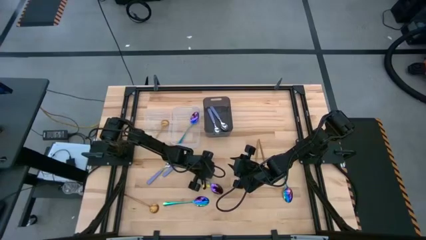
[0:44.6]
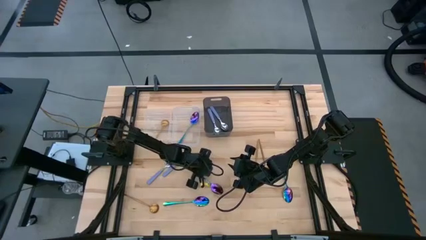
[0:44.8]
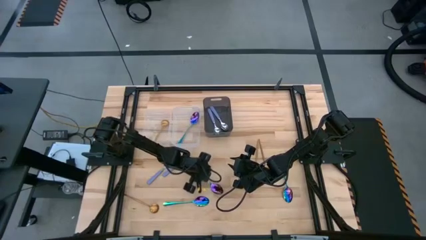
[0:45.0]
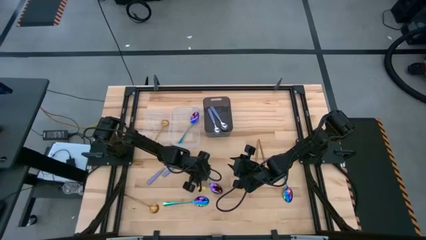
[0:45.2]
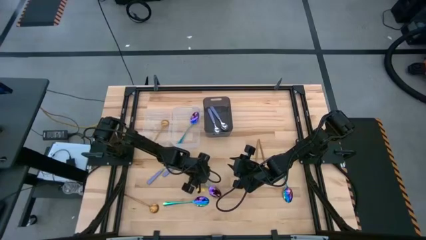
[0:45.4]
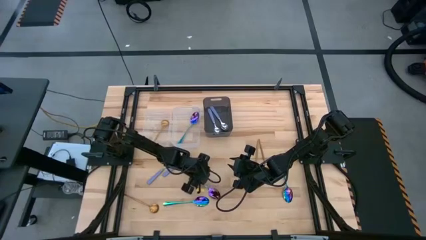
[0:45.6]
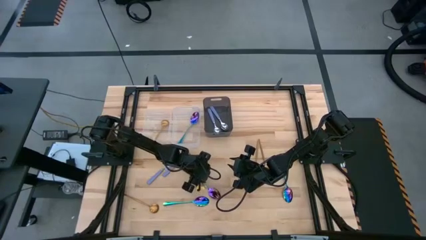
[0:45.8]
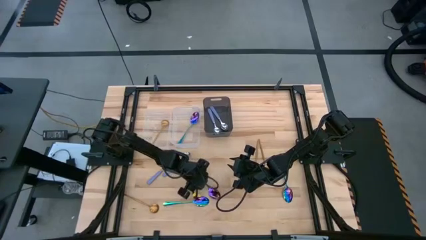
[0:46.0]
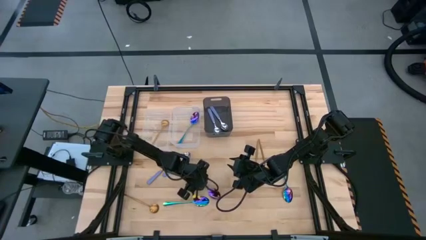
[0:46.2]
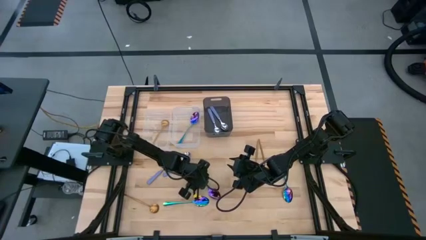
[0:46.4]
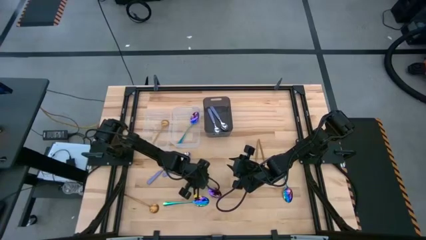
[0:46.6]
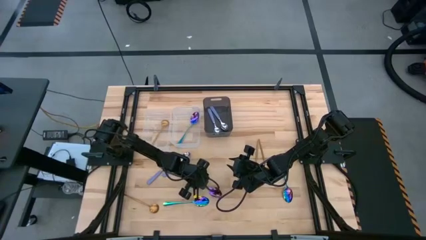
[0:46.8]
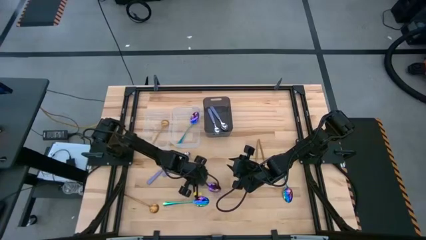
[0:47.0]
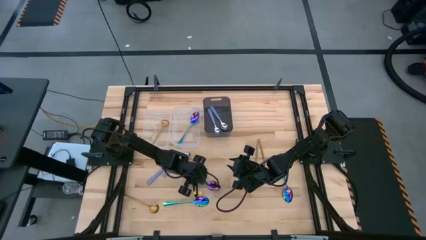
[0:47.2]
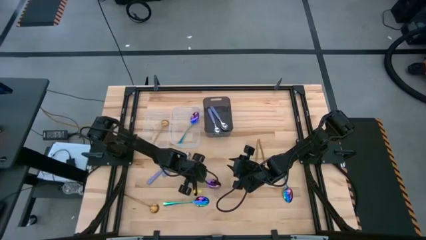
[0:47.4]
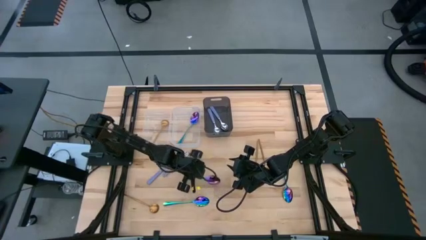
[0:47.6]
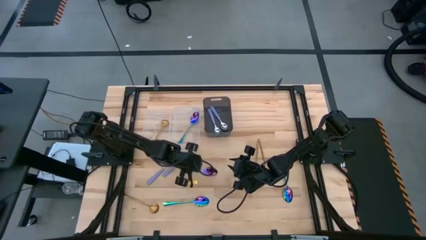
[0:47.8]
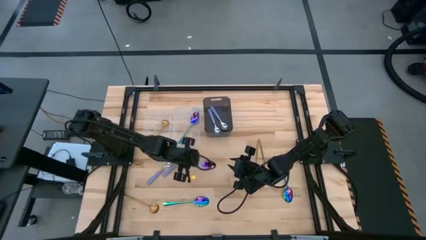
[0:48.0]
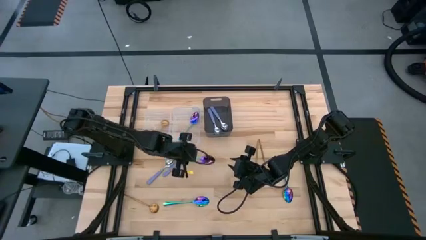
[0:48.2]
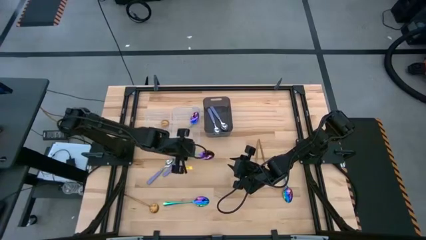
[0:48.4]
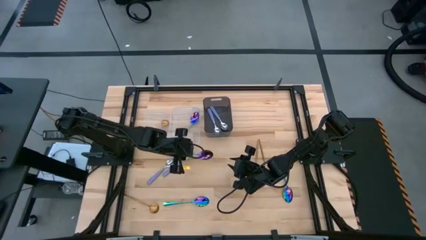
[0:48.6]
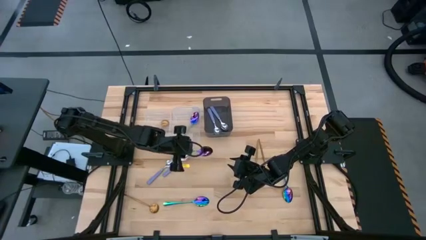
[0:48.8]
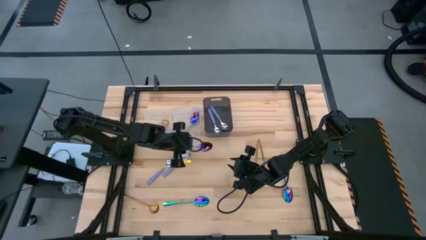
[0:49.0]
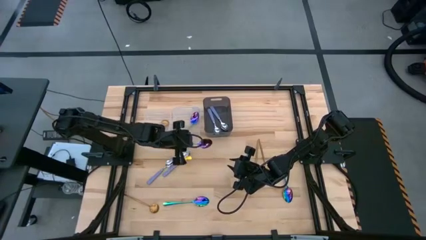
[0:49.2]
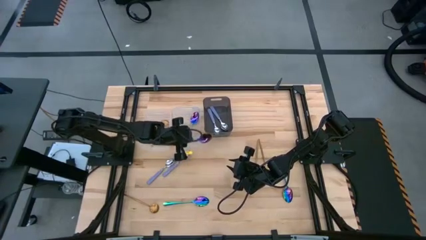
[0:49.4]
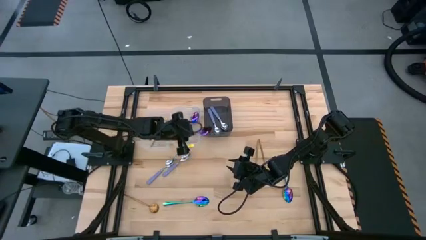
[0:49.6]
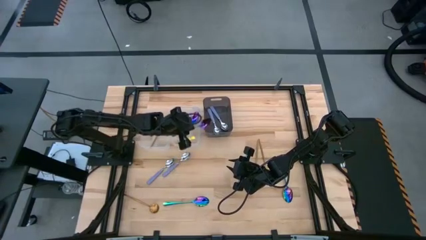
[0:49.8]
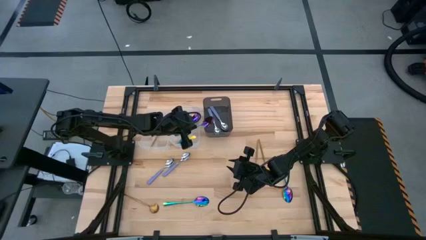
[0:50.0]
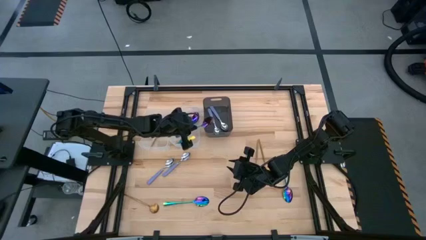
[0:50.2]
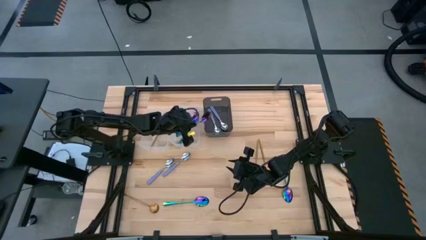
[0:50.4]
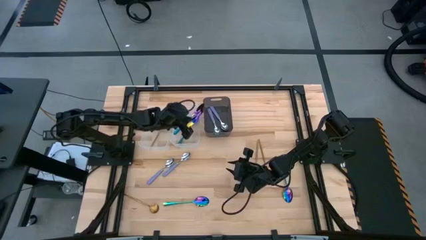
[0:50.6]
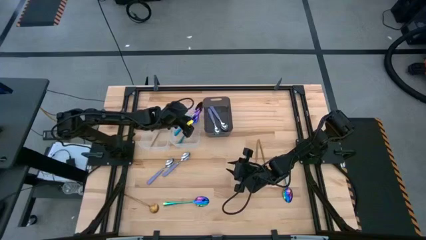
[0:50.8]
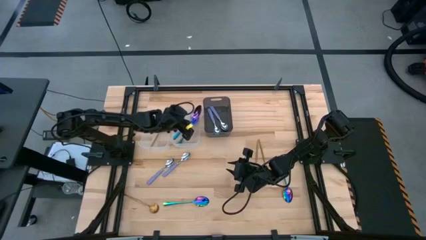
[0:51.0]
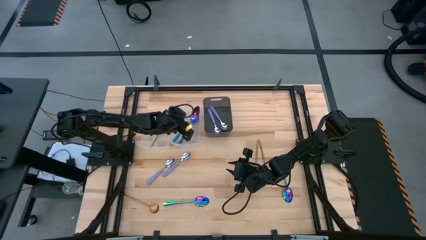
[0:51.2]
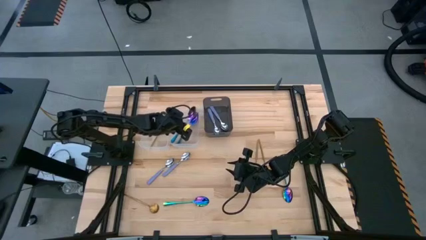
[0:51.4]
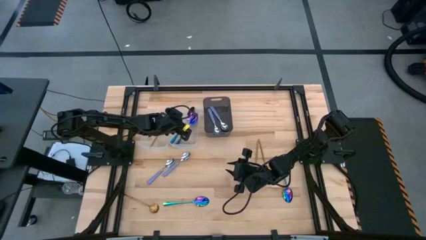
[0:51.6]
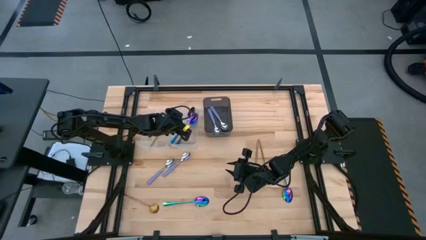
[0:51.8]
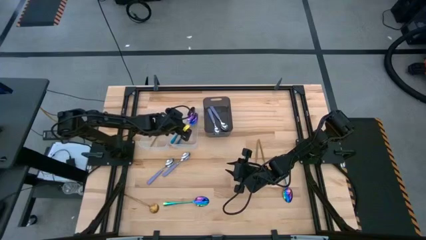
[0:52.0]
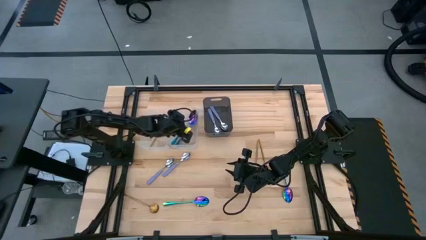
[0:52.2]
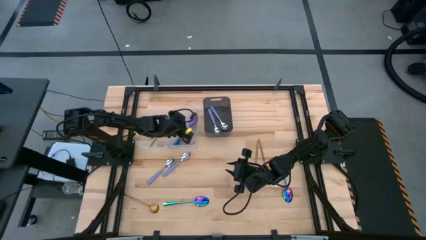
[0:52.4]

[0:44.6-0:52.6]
Task: Sort silverware by color (type)
Put the blue spoon into the right transparent bin

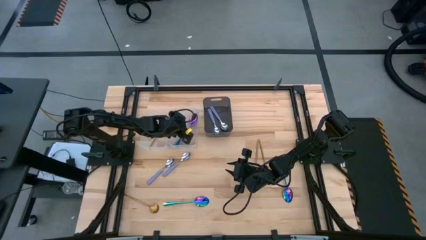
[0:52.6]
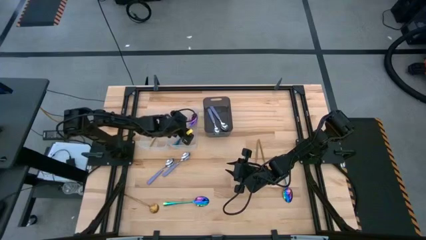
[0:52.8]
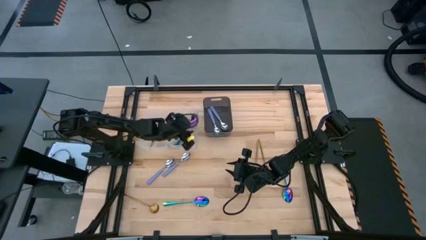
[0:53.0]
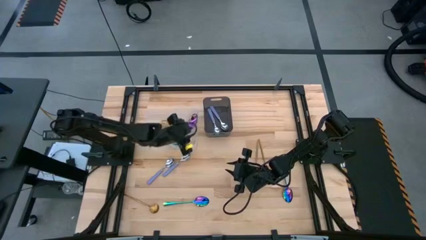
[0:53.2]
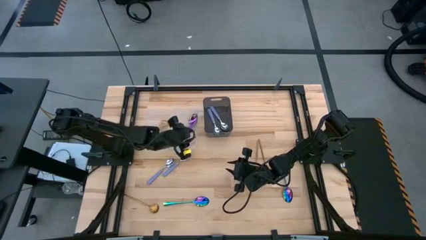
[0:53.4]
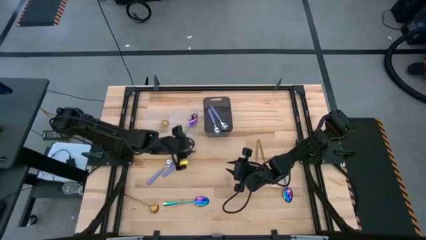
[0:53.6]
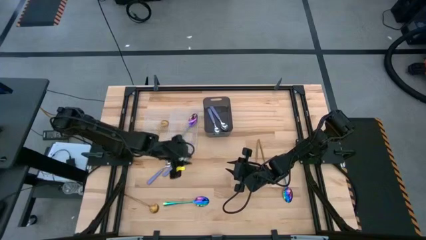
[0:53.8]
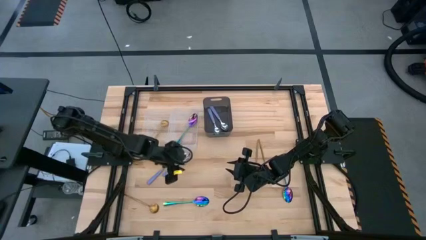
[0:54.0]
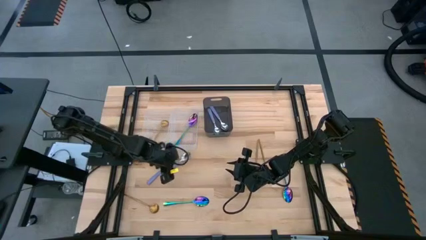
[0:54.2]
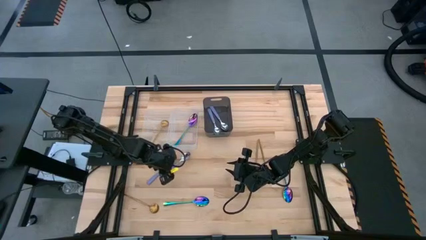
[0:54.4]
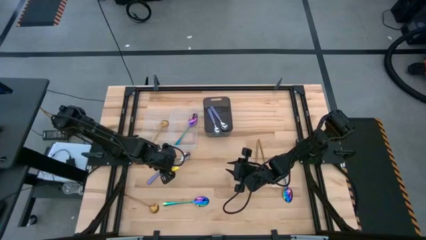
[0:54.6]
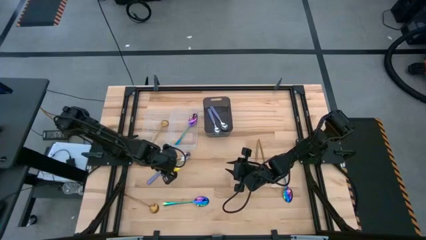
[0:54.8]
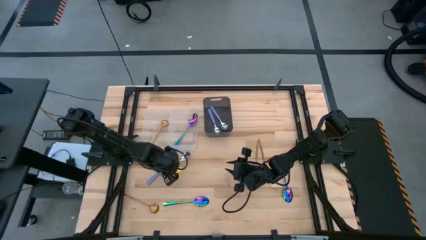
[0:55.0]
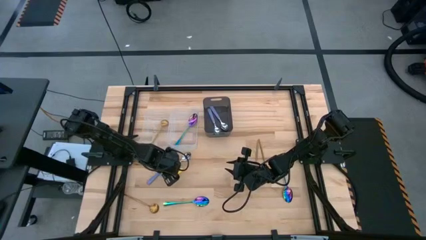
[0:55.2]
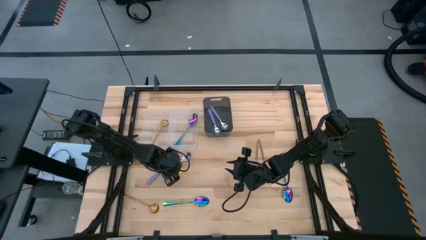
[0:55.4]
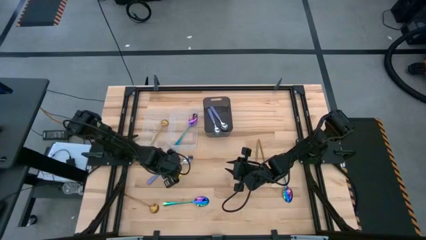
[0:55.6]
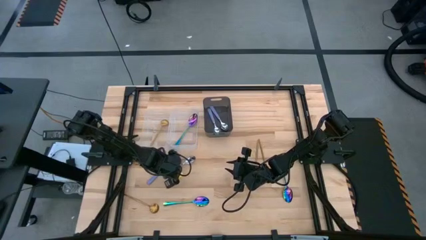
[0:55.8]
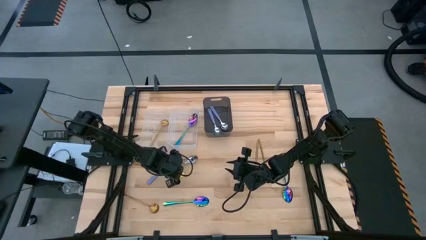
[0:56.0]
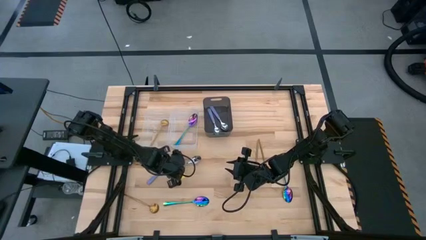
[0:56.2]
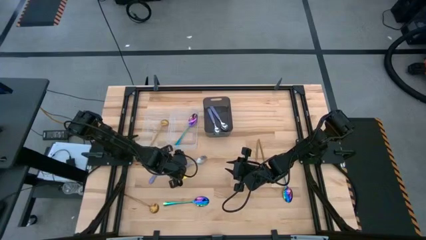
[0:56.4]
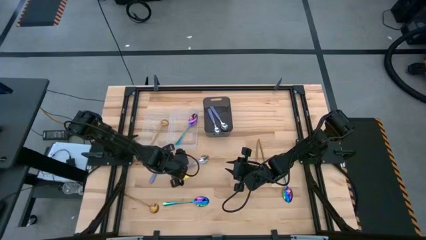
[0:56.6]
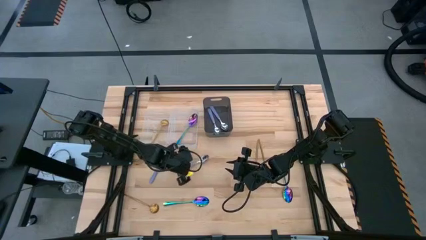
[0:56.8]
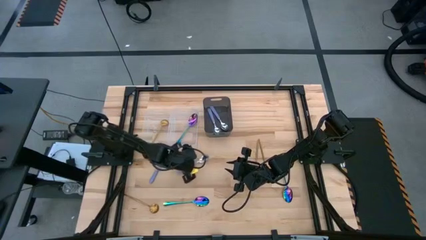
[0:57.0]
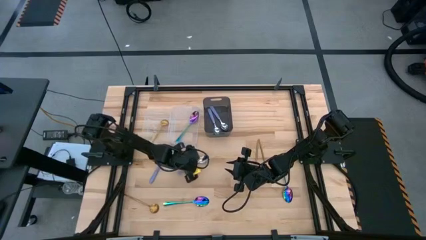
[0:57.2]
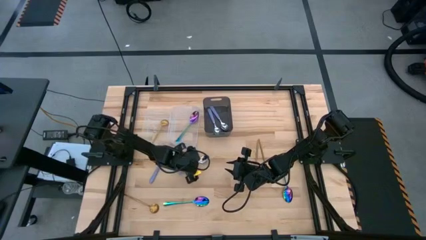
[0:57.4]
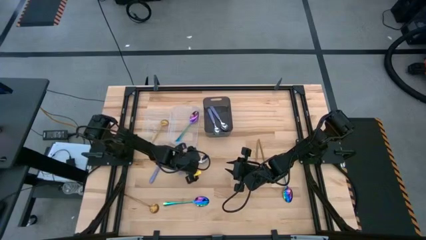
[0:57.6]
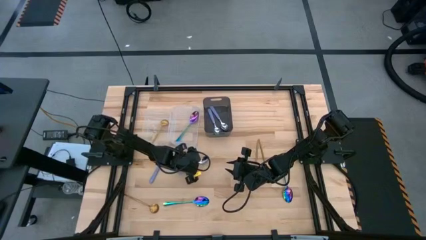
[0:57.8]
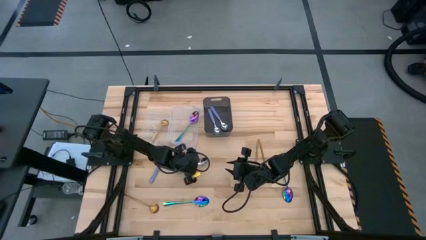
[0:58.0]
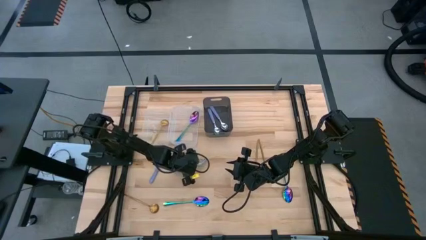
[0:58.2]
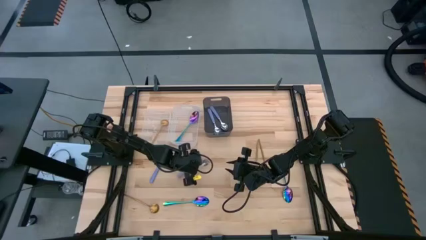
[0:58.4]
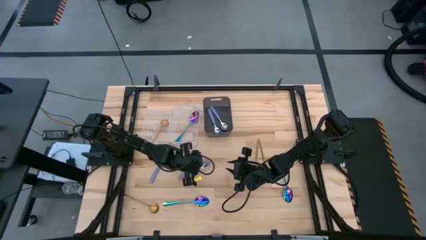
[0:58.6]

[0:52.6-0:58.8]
Put the purple spoon into the black transparent bin

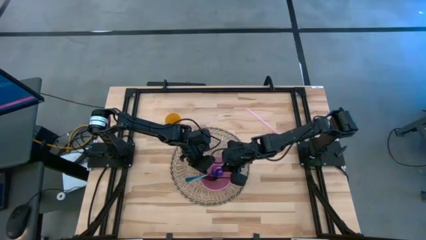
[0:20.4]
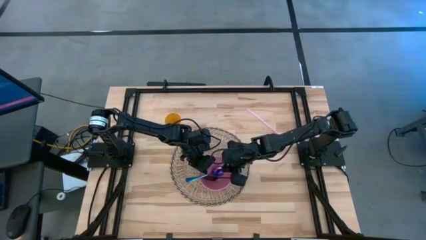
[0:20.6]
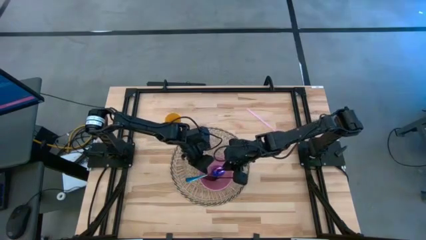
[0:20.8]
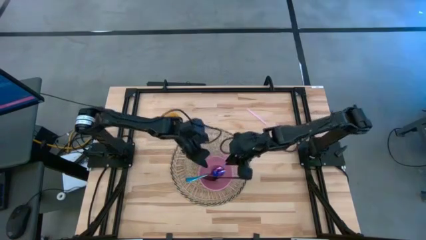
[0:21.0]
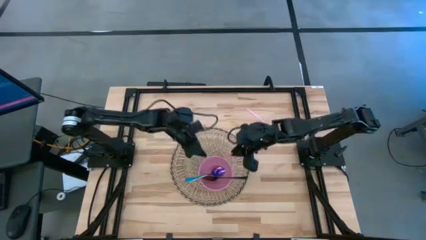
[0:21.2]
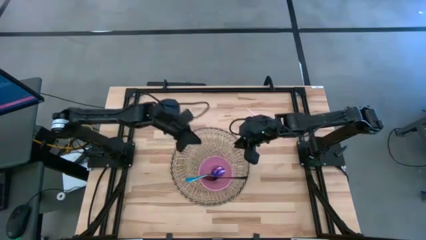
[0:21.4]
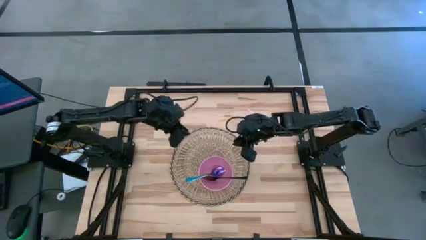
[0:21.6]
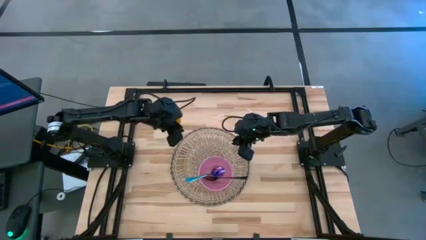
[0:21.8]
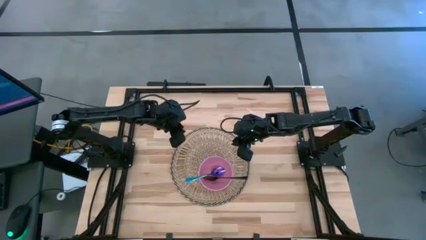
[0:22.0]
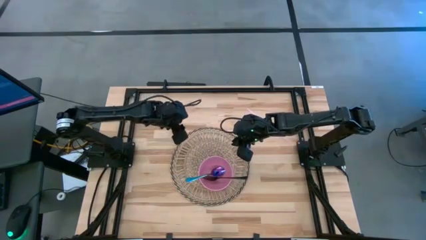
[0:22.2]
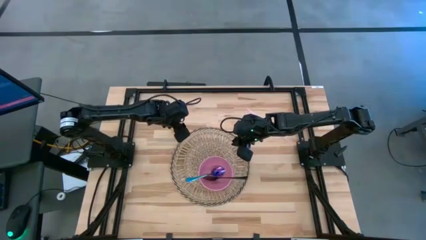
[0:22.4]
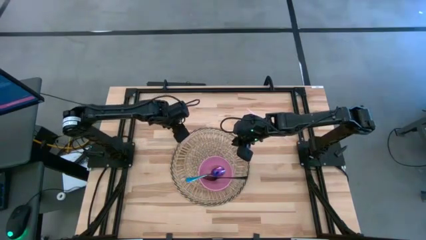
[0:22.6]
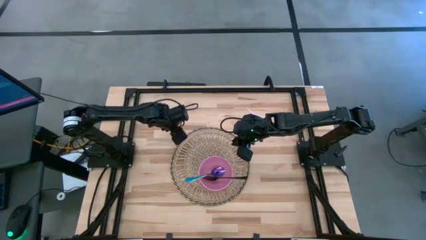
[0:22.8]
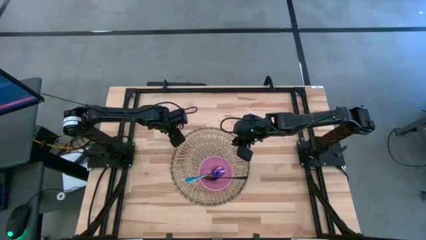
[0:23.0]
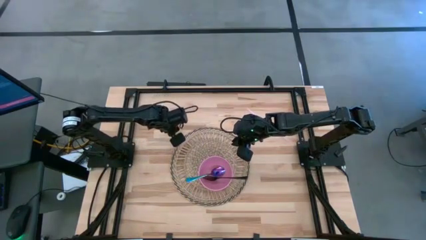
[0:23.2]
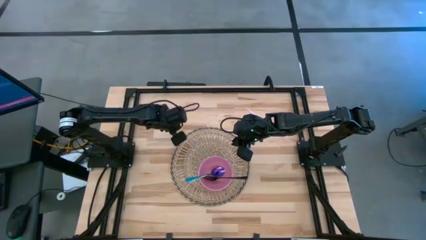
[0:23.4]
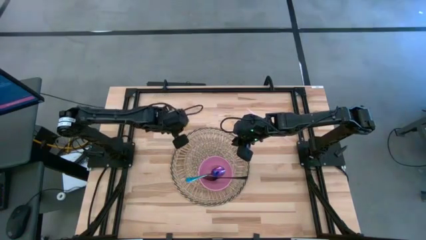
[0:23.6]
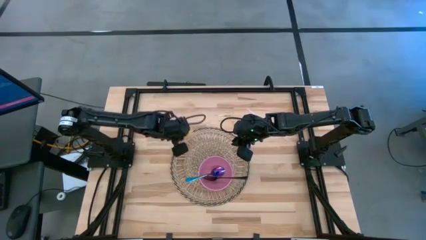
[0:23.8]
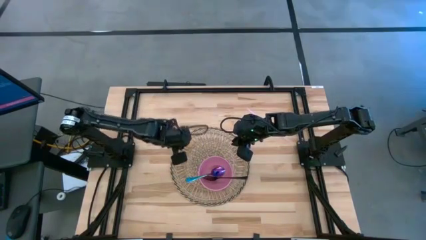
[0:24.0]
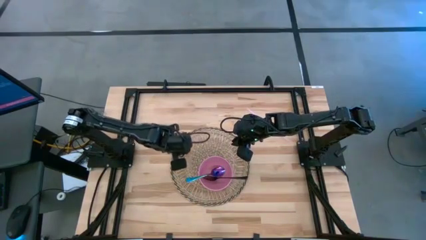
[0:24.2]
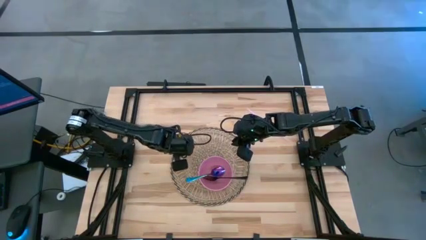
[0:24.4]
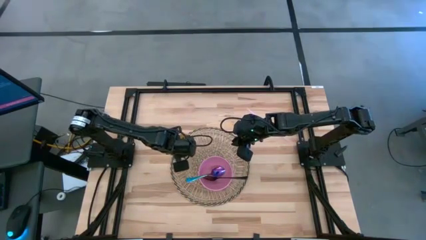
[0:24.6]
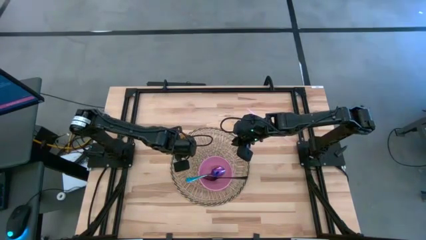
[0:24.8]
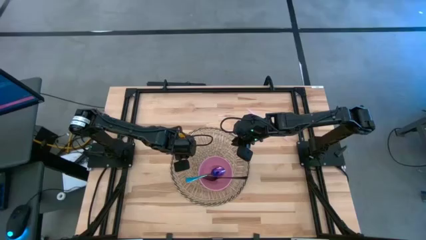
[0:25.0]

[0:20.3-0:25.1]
Task: Pick & Place Utensil
Put the yellow cup on the top left of the pink bowl on the brown mat
